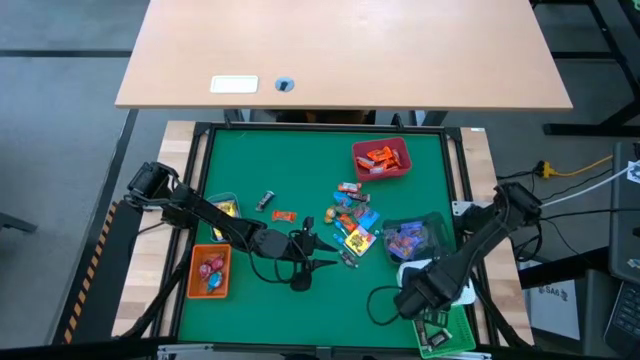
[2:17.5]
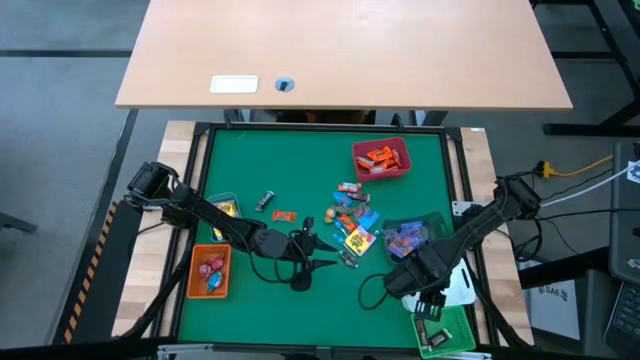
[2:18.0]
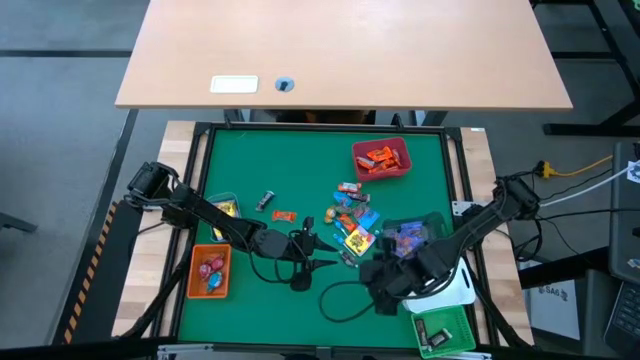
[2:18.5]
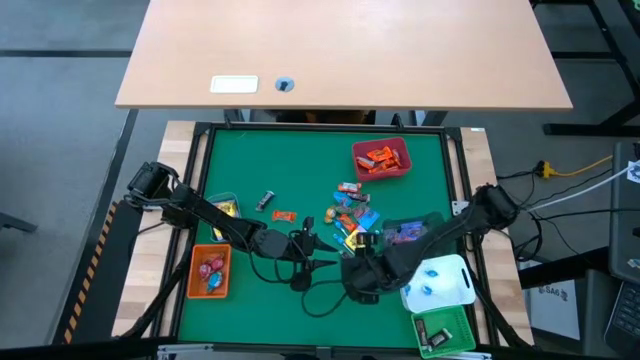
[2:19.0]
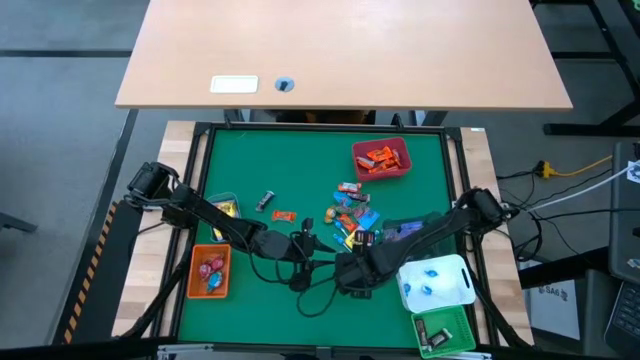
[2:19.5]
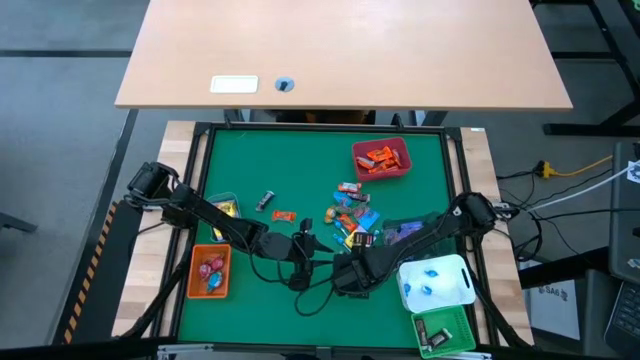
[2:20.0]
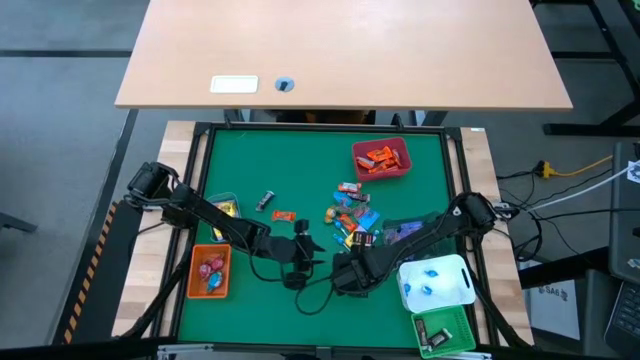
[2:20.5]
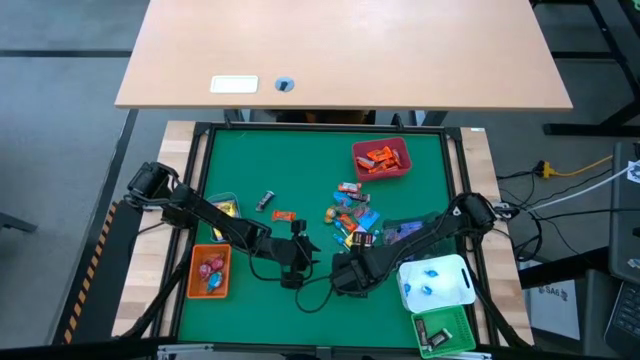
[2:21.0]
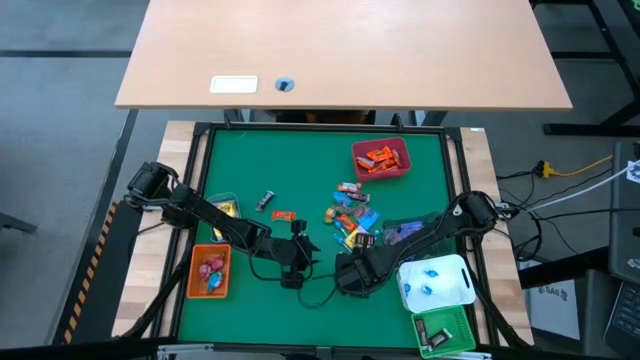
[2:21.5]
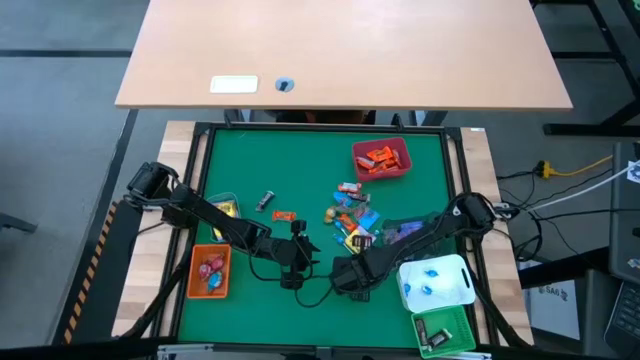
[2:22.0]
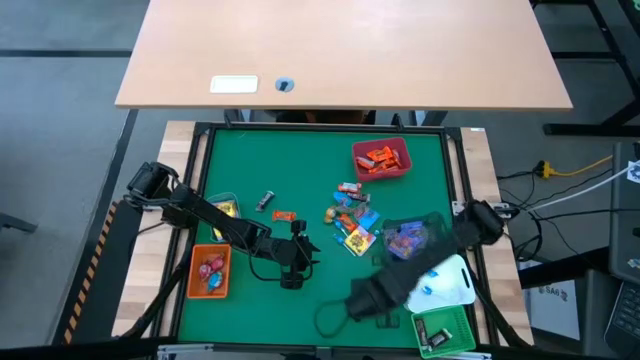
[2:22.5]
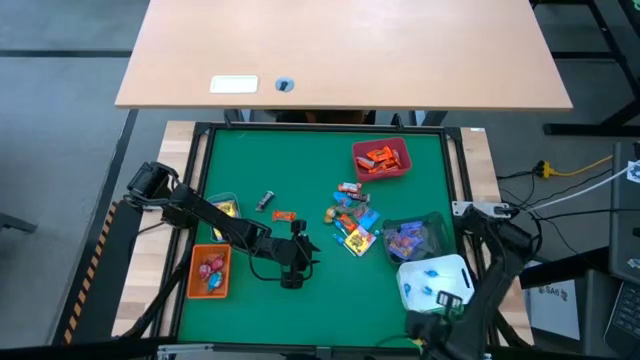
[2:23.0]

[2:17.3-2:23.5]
Task: Sort candy
Put the brown chocolate bar into the green bin

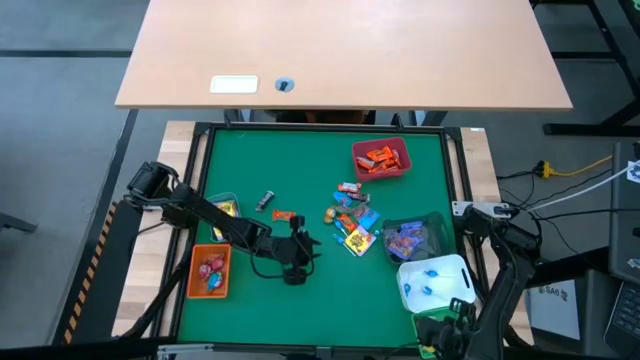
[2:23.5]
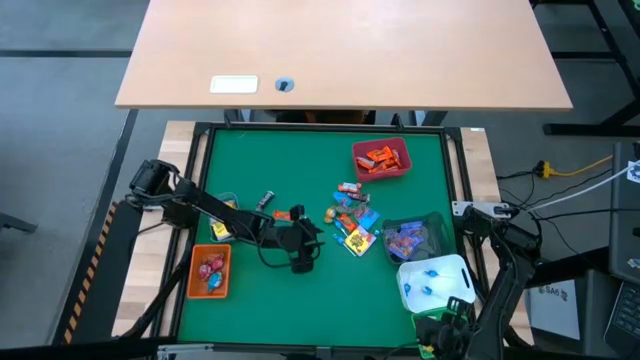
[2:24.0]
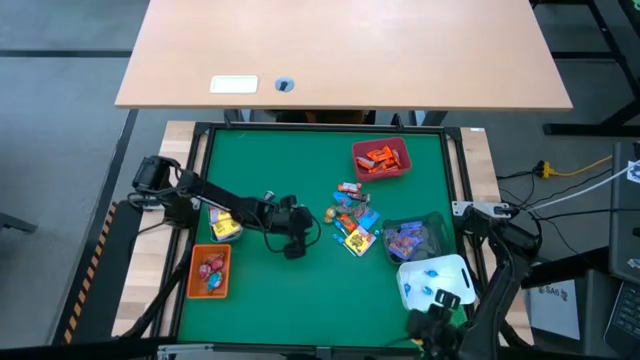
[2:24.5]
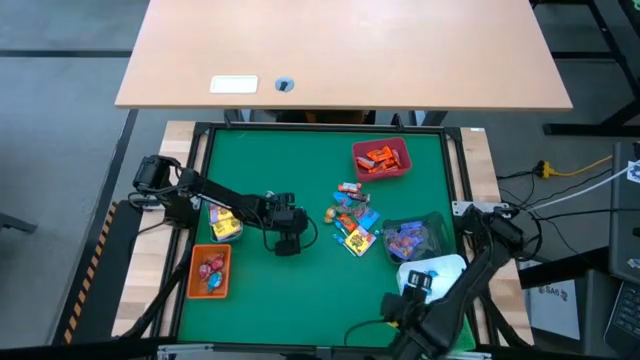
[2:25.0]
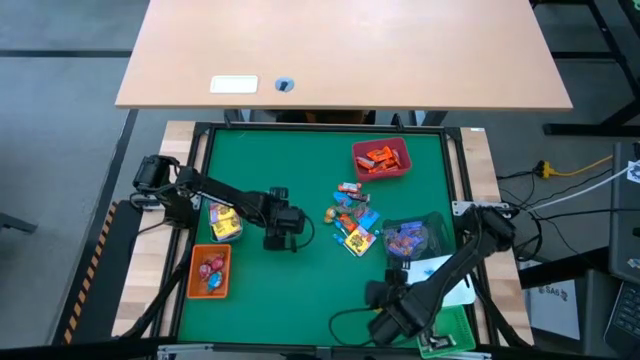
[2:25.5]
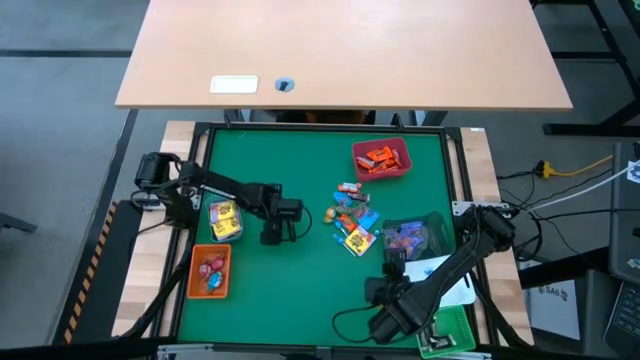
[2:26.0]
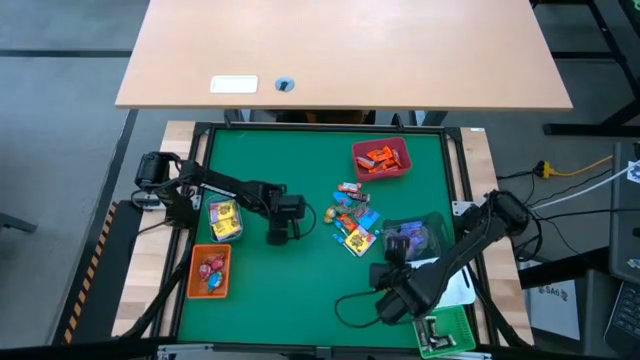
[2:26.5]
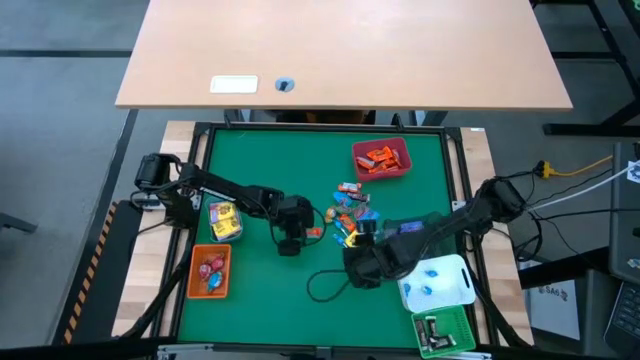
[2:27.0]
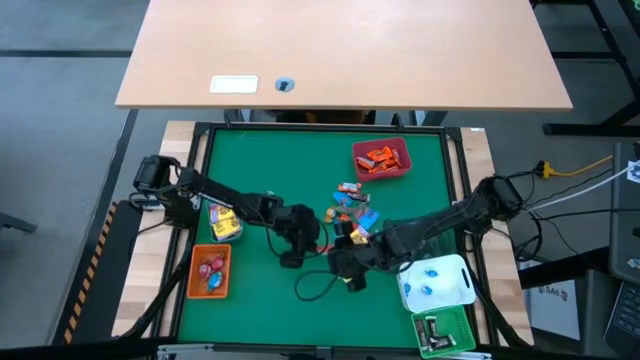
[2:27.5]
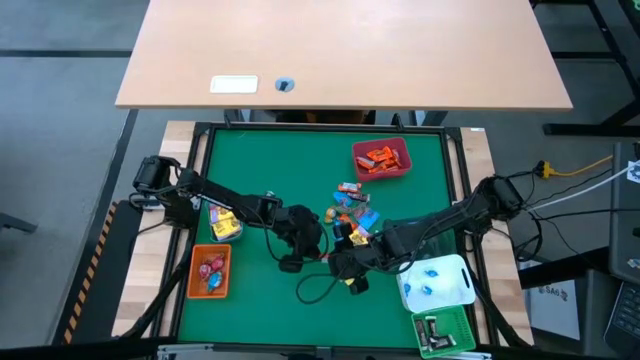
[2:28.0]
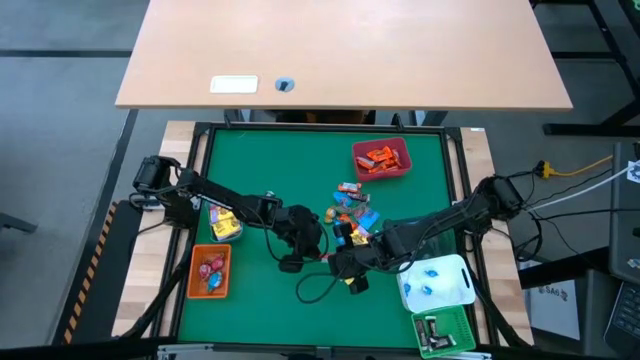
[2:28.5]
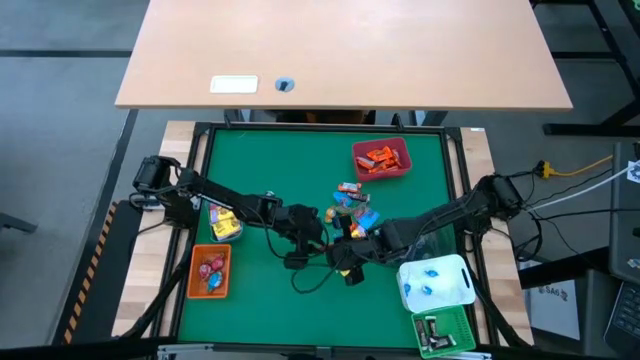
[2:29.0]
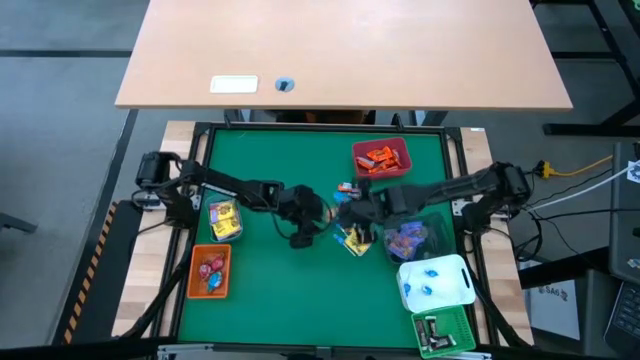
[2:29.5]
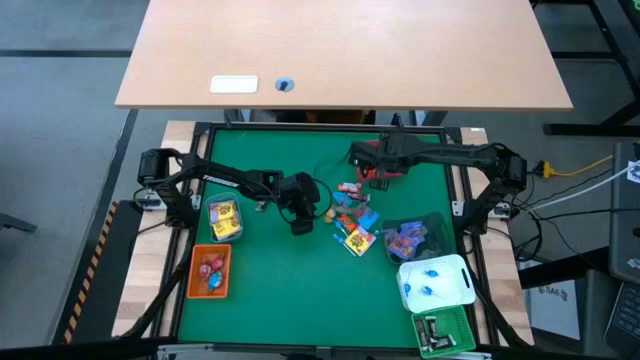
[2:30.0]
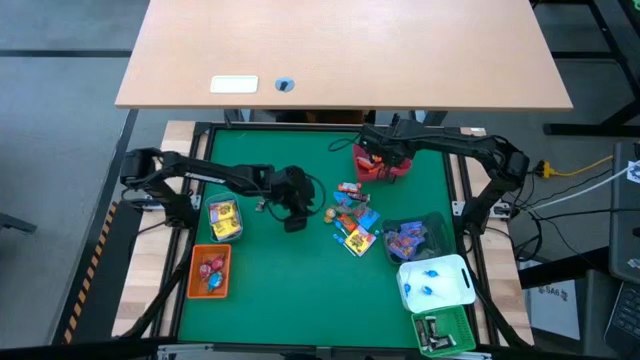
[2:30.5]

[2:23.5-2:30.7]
Put the orange chocolate bar into the red bin

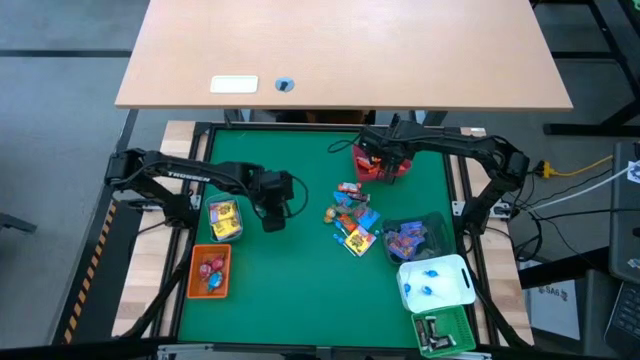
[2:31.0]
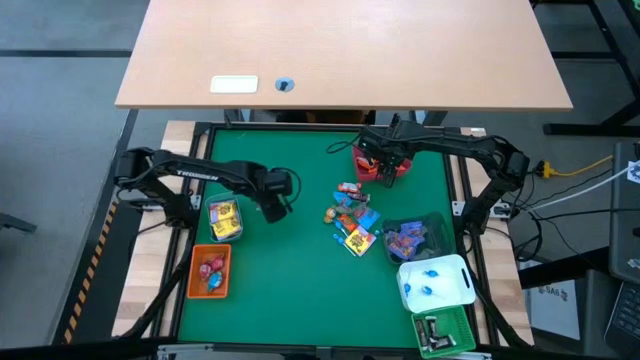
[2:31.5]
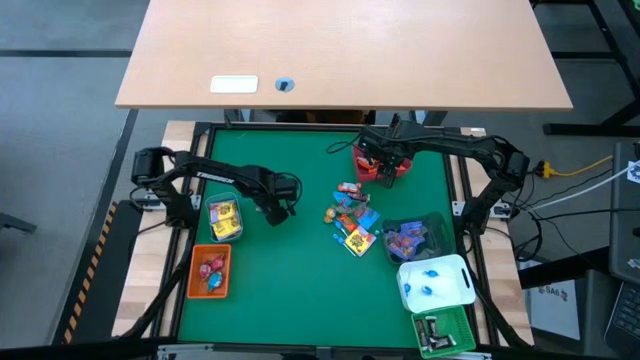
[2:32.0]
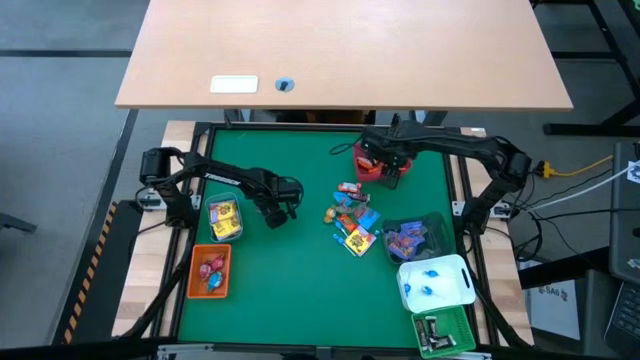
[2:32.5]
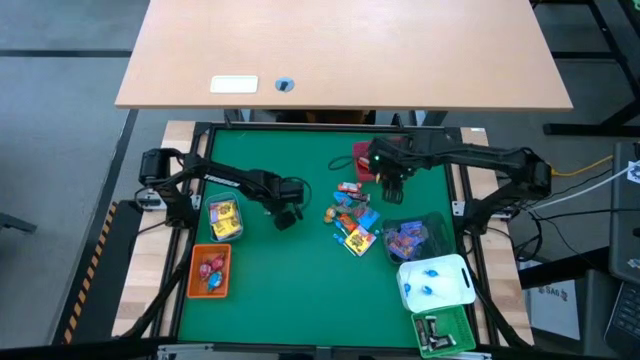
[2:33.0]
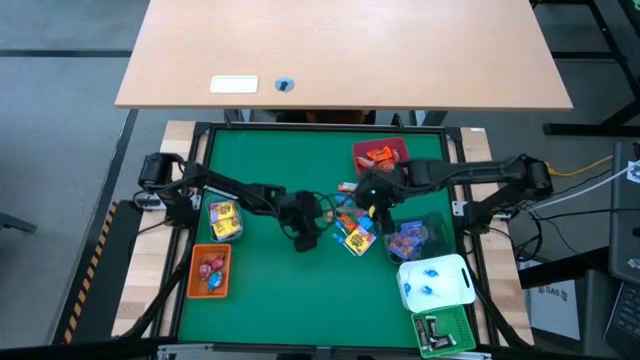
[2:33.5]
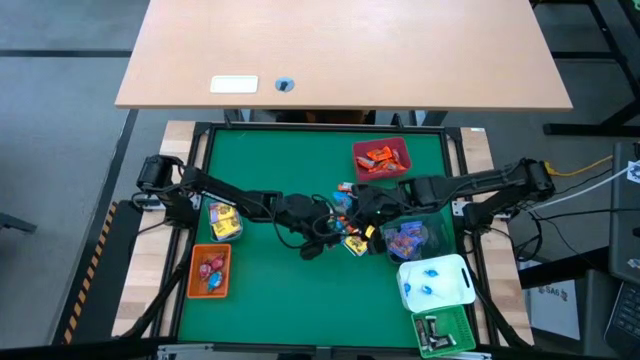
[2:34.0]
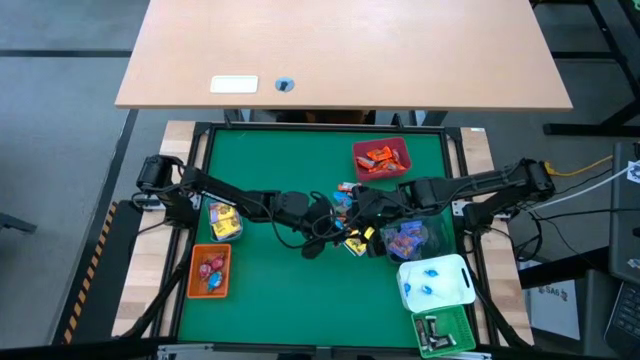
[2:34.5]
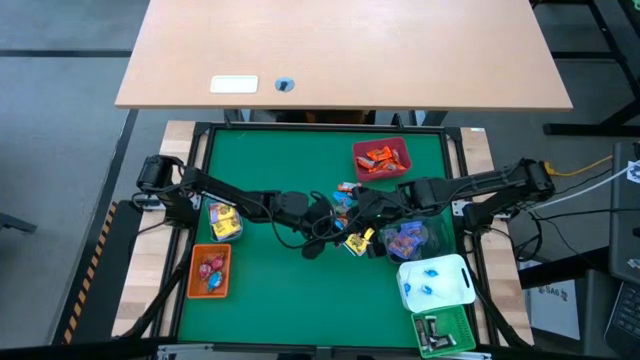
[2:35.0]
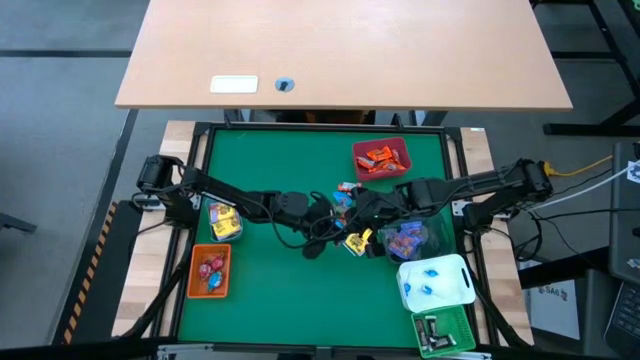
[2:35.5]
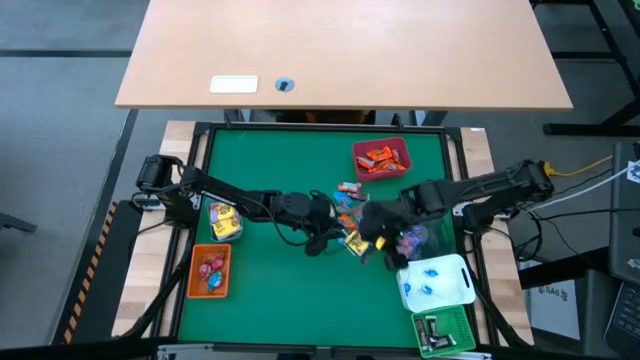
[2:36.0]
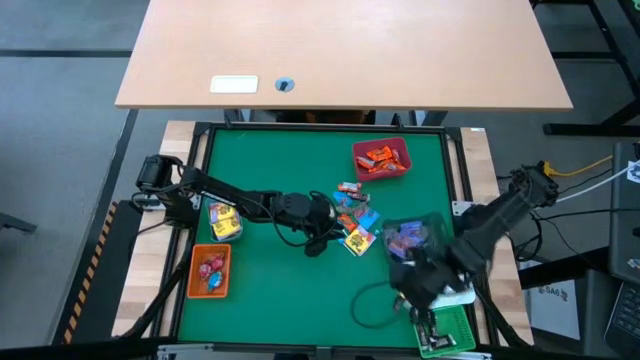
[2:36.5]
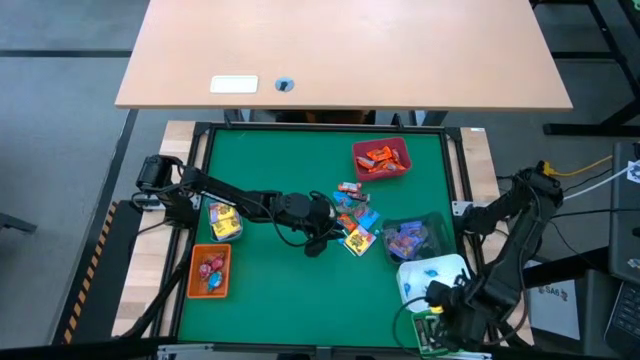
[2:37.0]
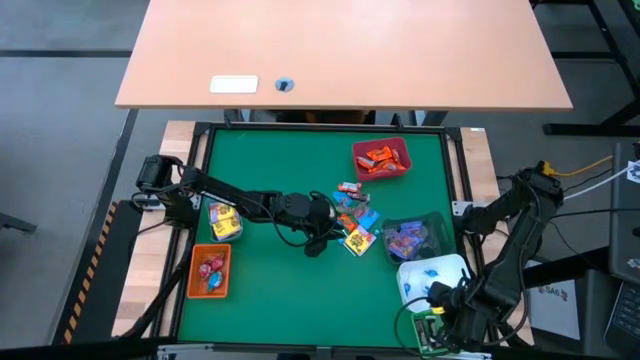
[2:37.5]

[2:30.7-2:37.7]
Put the brown chocolate bar into the green bin

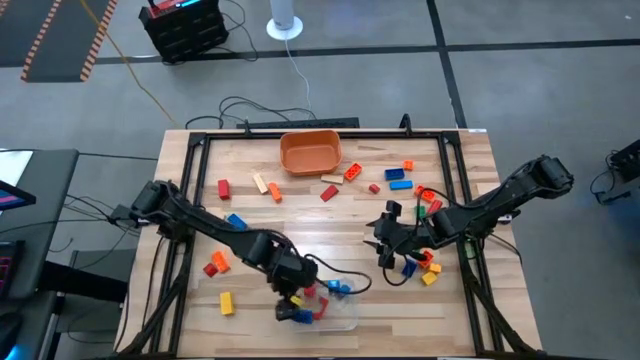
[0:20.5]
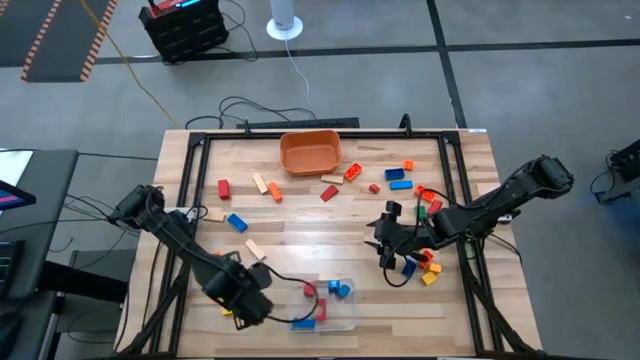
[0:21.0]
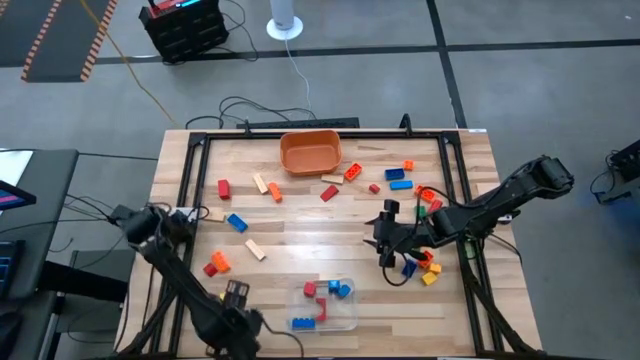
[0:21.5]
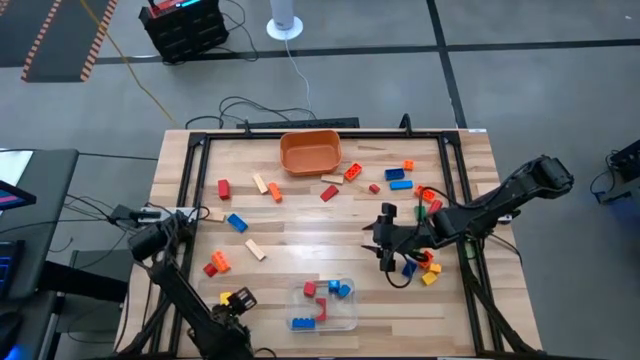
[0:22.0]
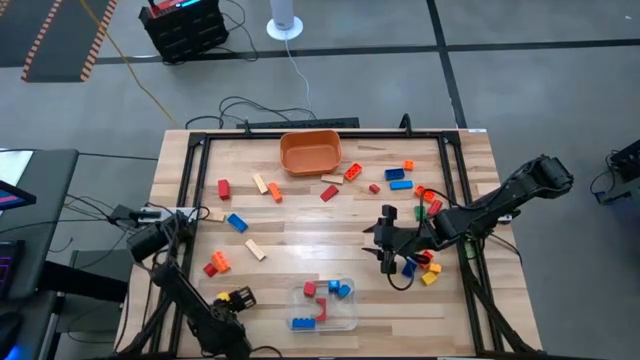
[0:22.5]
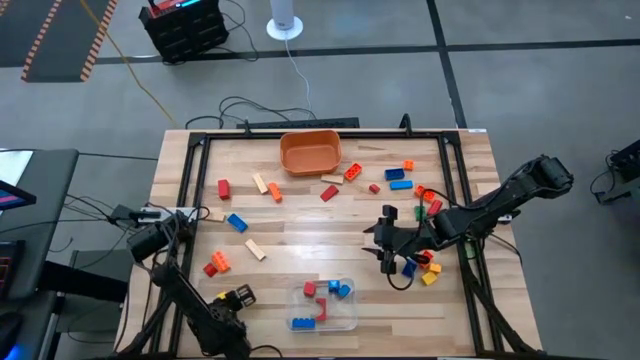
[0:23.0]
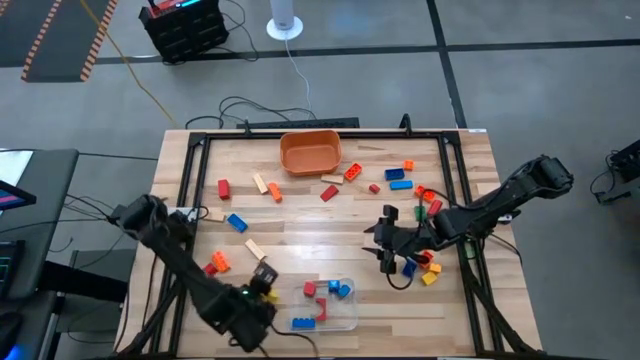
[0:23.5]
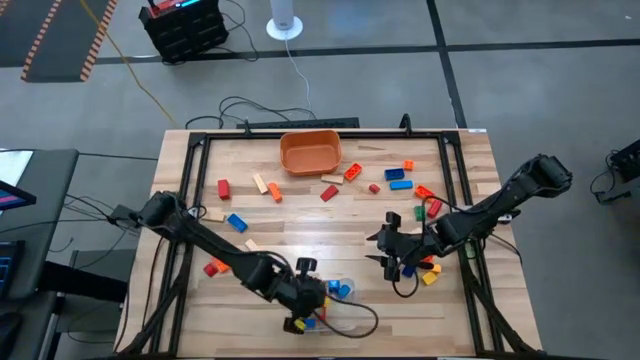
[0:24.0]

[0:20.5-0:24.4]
Task: Sort blocks by size
Put the large yellow wooden block into the transparent bin
